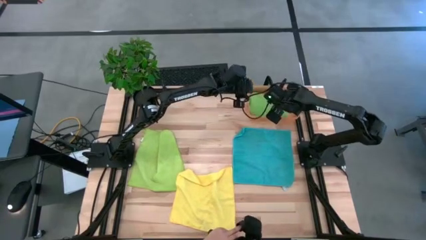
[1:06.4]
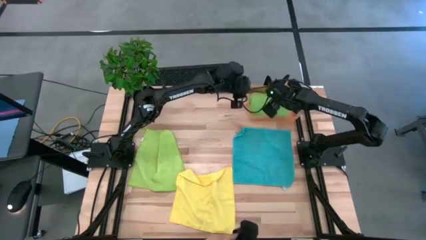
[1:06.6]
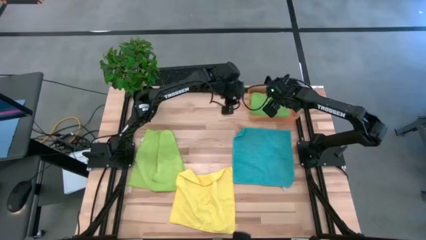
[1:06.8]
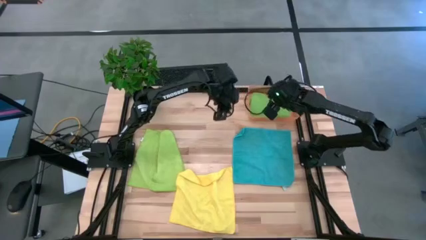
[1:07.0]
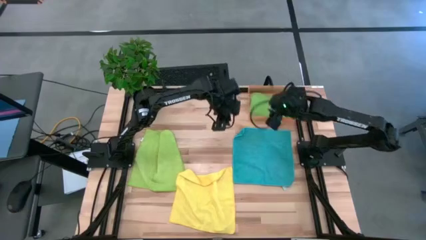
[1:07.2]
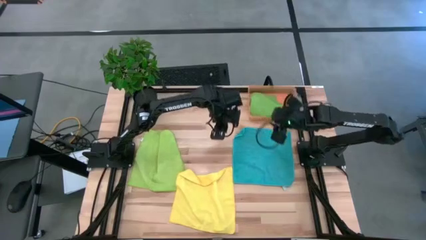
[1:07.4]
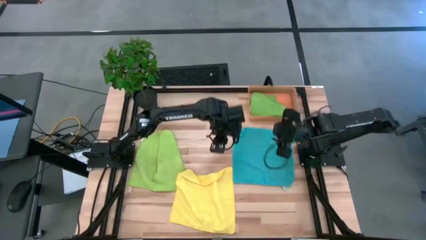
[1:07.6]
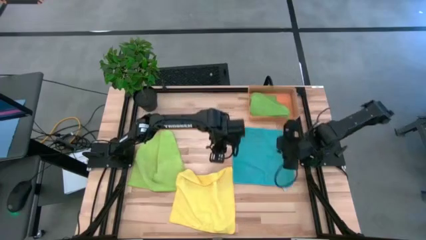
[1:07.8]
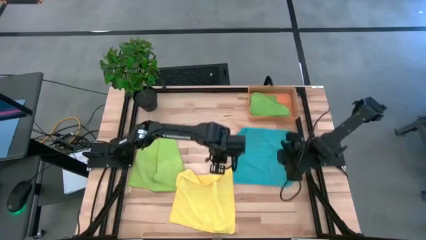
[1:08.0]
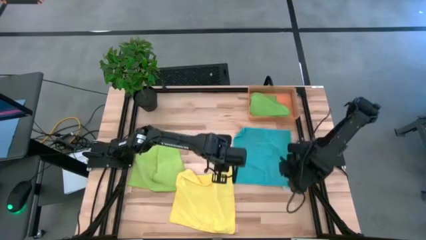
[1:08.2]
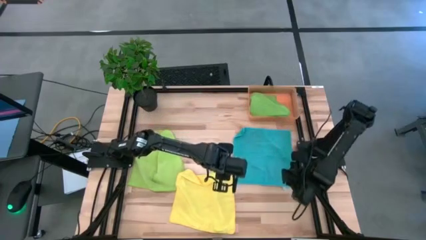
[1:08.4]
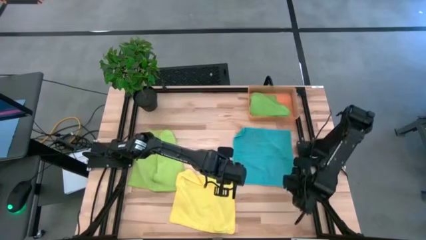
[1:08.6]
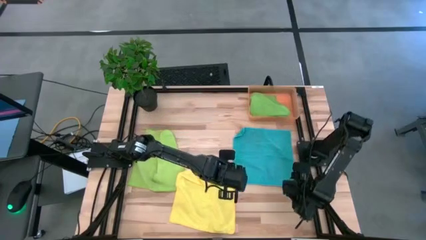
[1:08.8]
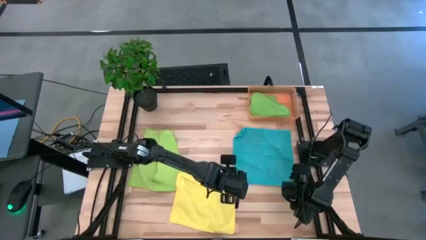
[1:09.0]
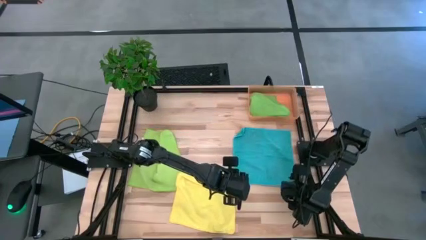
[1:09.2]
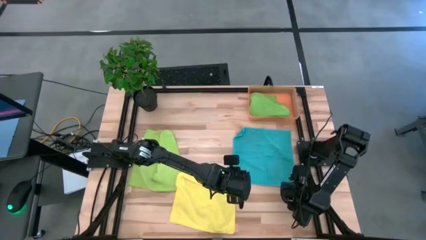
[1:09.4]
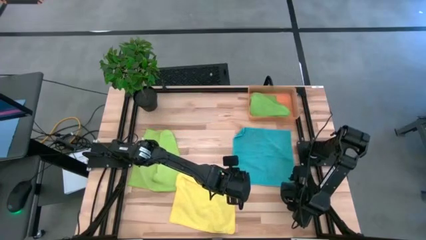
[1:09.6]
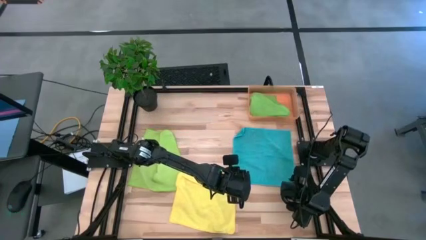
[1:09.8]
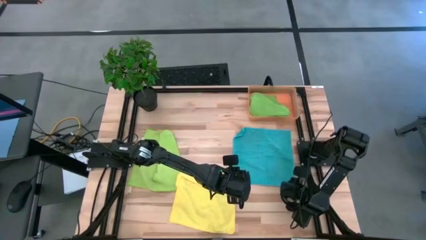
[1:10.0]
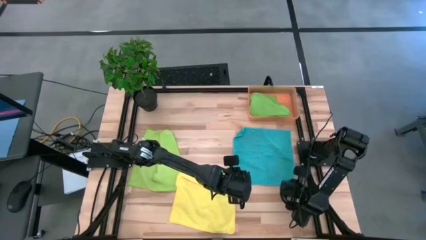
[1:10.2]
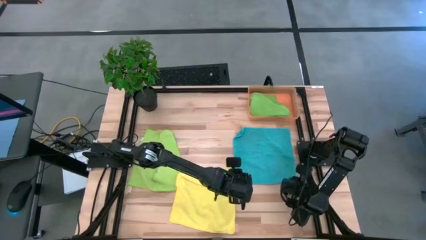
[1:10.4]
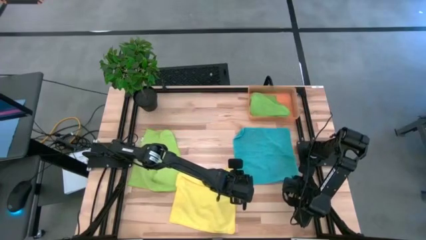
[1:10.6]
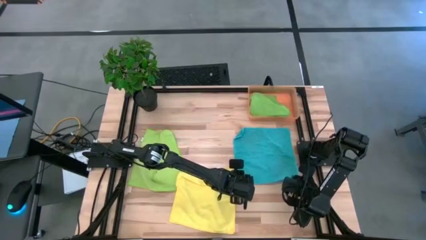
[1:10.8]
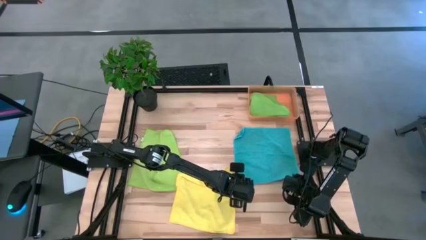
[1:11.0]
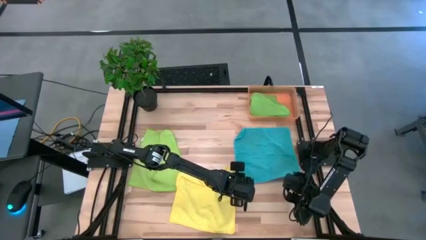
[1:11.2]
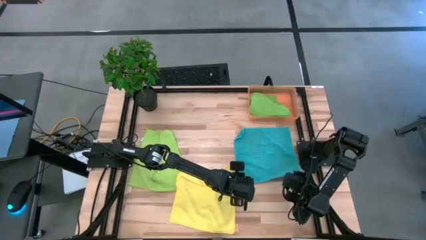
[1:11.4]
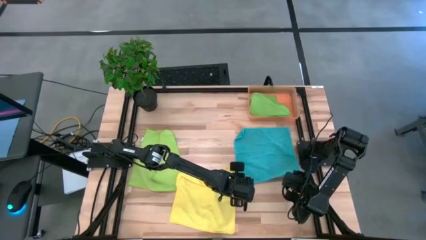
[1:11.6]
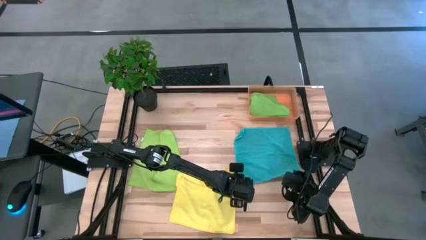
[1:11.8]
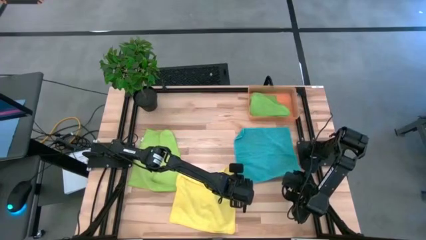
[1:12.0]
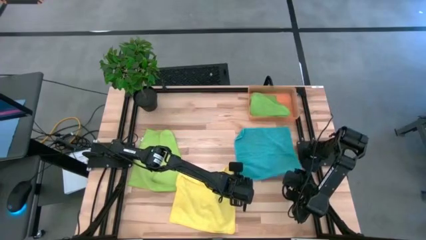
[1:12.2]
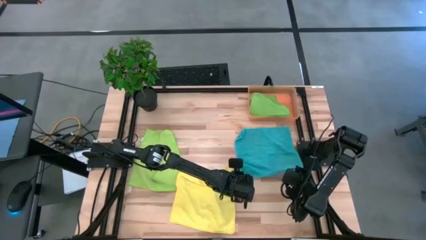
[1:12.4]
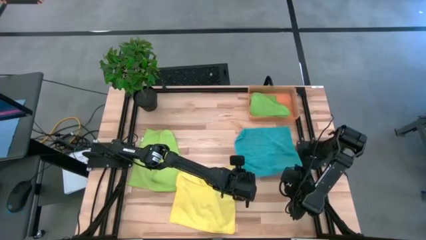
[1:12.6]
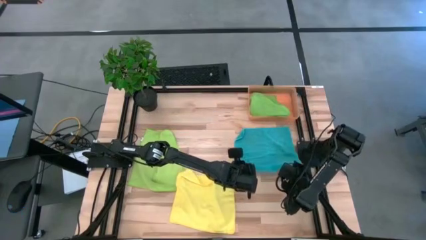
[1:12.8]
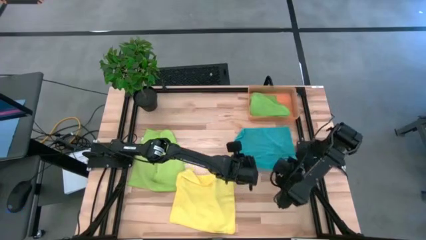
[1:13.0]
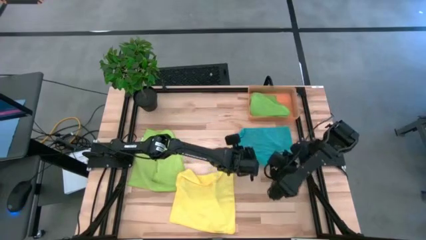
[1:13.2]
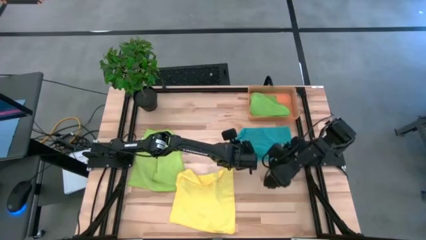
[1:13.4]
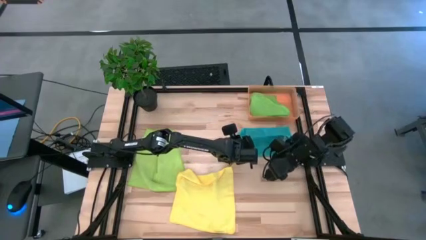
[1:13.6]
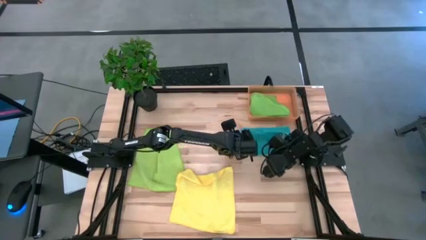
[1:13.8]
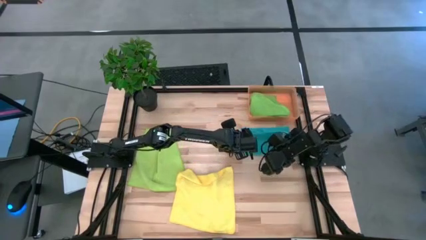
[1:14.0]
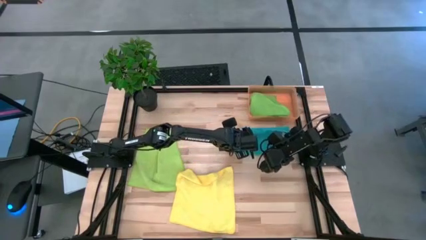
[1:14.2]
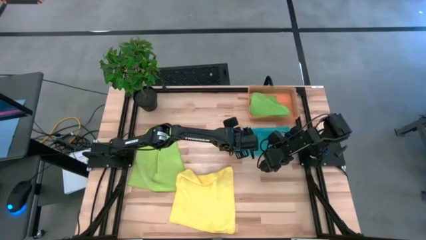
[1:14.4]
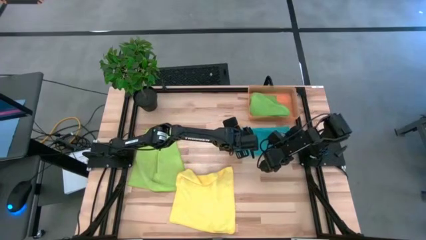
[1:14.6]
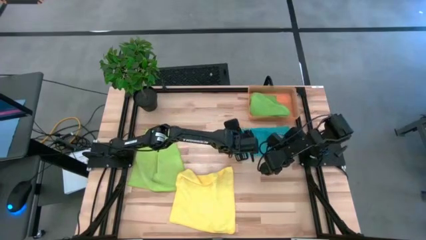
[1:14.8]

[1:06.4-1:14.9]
Task: Fold microfiber towels
Fold the blue microfiber towel

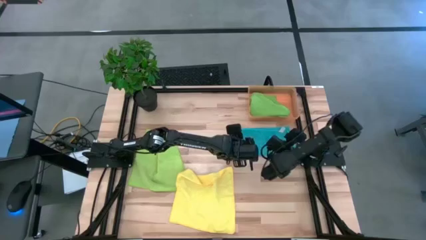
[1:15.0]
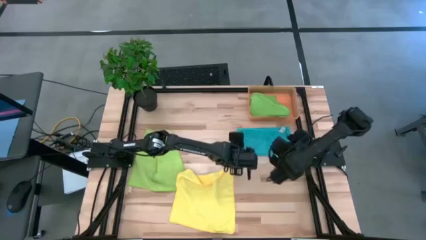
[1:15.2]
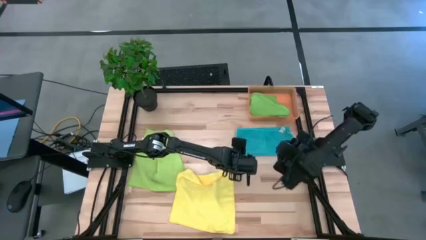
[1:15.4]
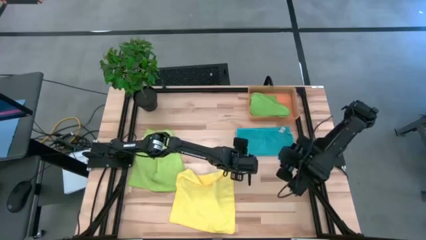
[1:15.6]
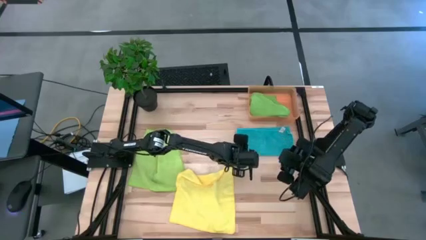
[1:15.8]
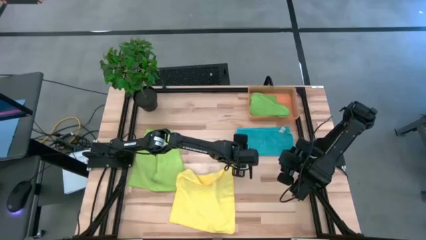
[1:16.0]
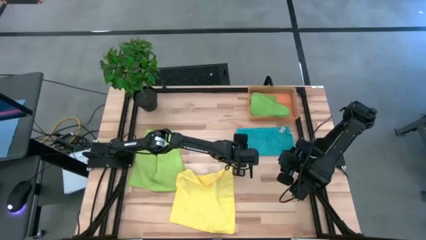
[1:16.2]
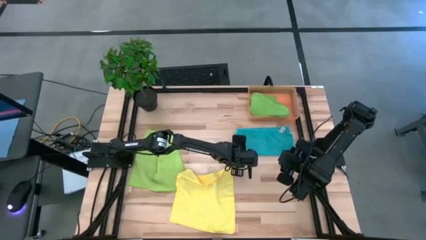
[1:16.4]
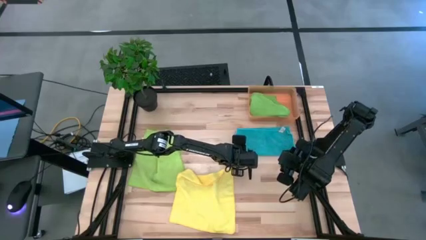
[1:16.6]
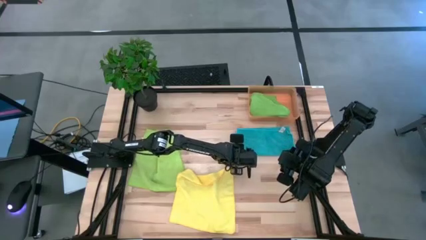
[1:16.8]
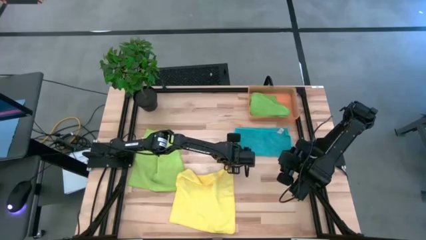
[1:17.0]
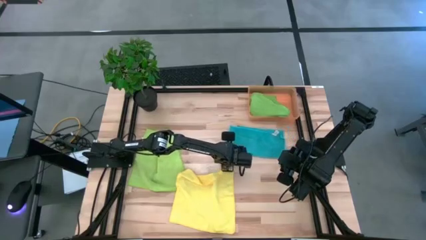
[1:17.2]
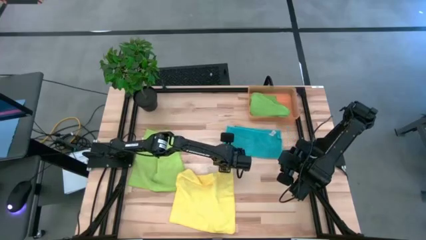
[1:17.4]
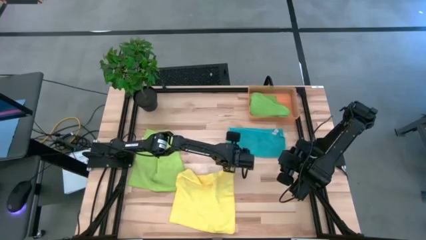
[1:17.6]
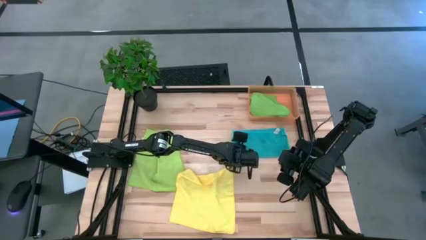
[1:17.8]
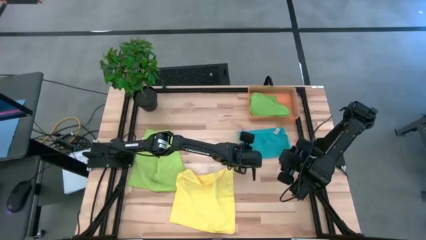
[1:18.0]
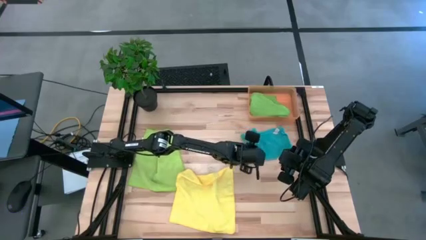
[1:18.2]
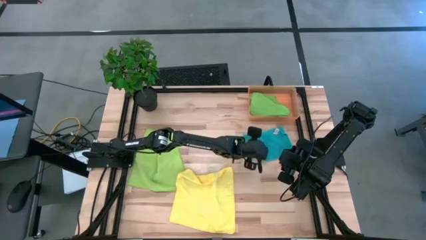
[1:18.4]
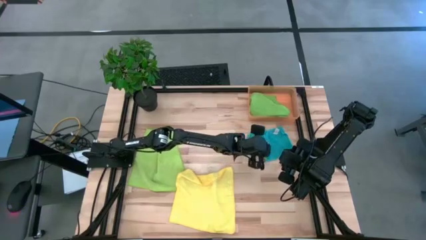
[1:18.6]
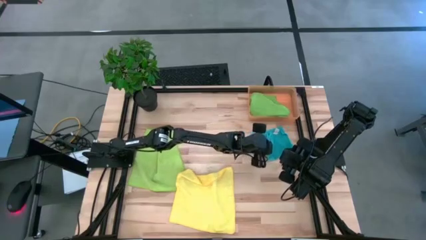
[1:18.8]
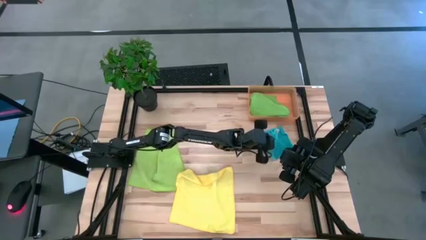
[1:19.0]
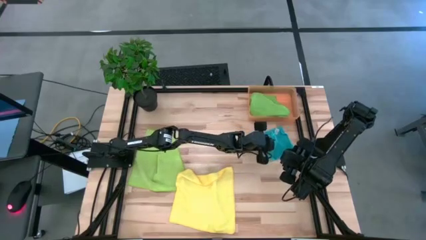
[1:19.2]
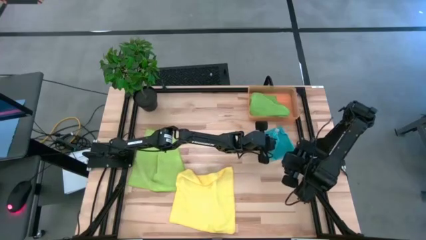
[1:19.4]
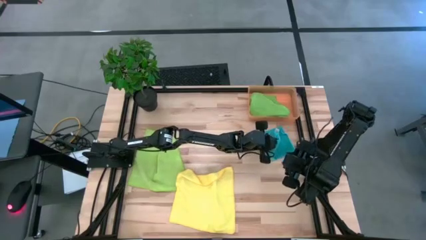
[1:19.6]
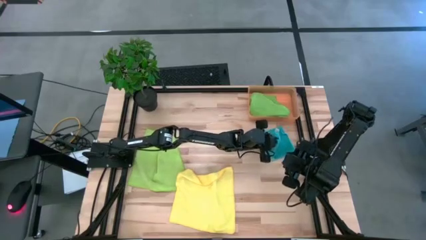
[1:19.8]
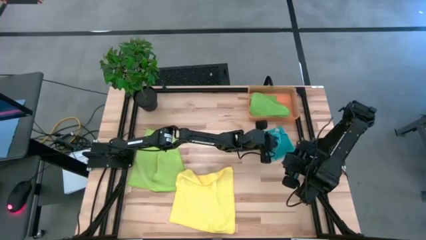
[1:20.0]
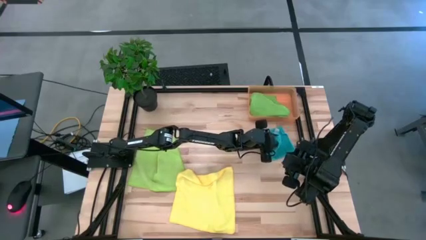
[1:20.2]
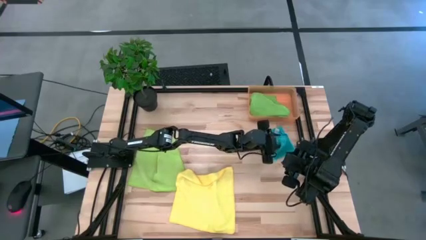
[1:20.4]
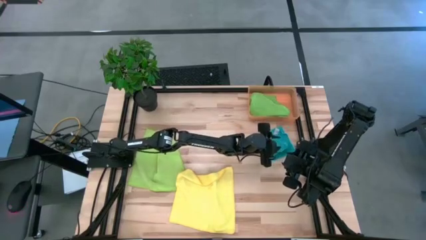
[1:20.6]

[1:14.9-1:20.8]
Fold the blue microfiber towel
